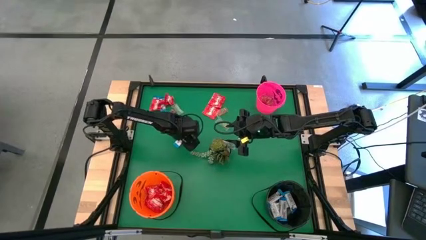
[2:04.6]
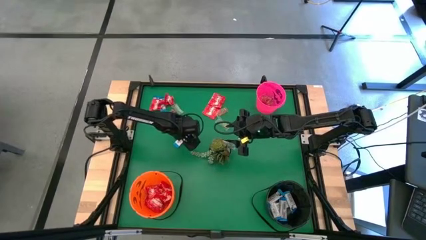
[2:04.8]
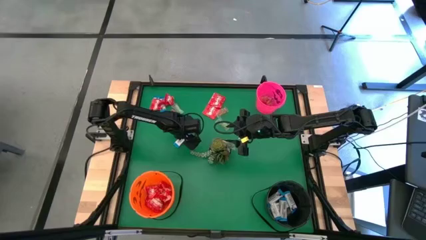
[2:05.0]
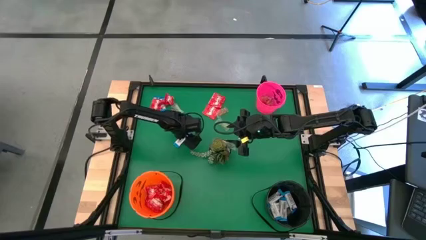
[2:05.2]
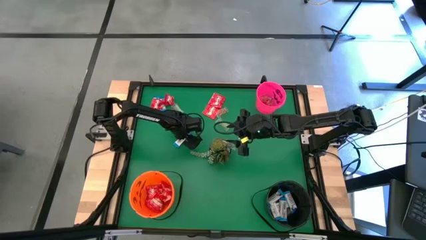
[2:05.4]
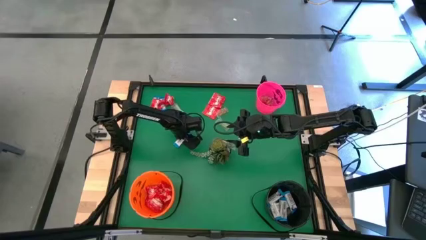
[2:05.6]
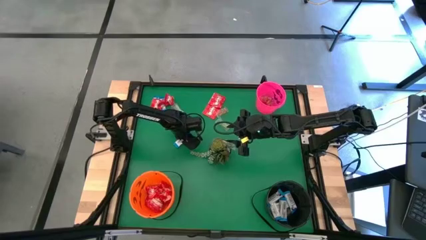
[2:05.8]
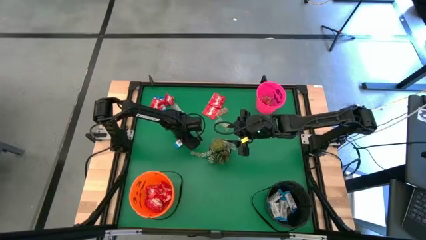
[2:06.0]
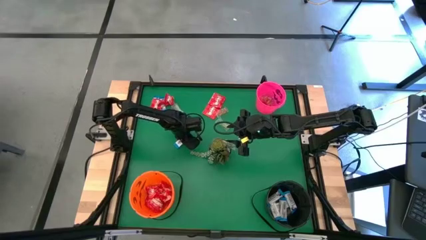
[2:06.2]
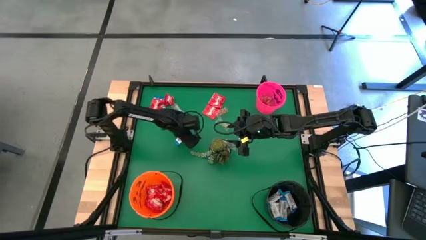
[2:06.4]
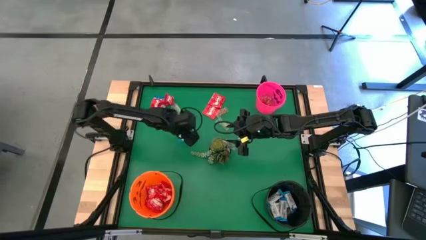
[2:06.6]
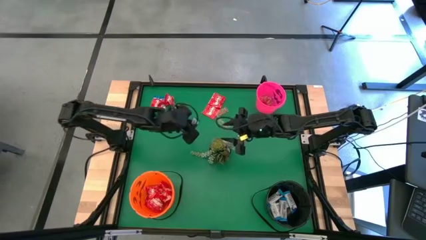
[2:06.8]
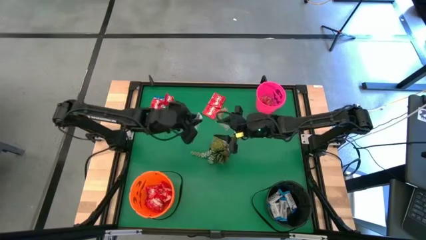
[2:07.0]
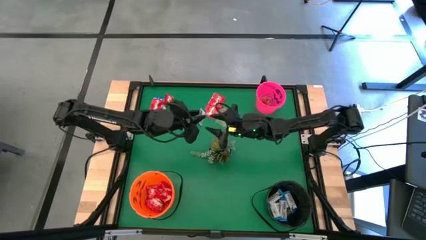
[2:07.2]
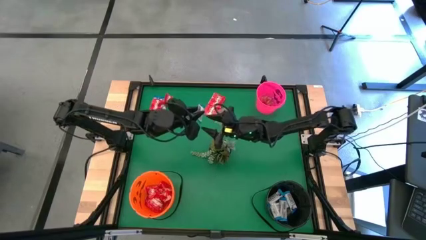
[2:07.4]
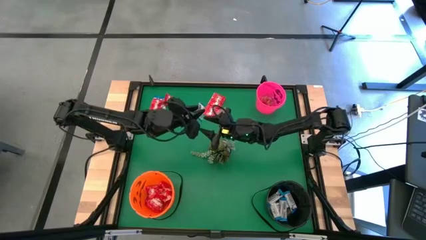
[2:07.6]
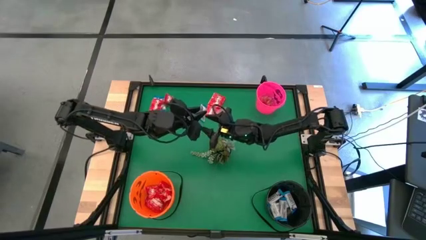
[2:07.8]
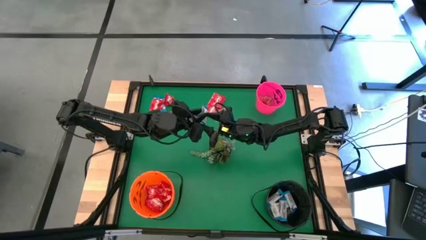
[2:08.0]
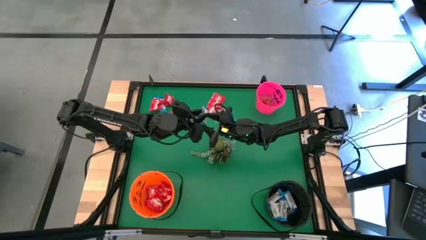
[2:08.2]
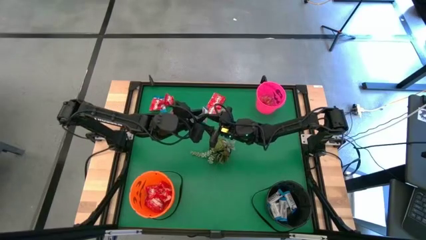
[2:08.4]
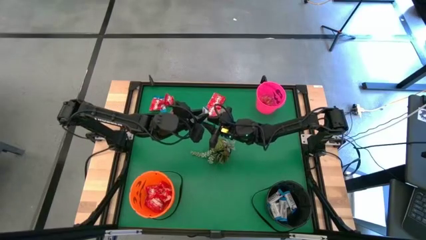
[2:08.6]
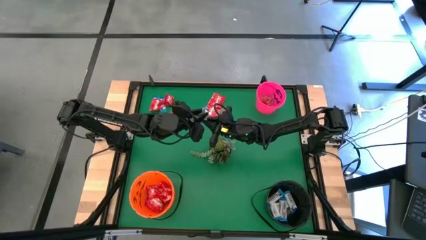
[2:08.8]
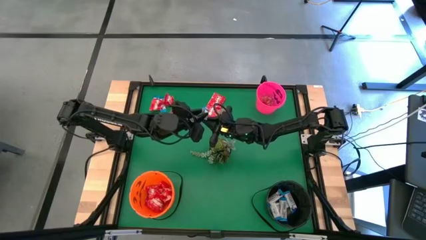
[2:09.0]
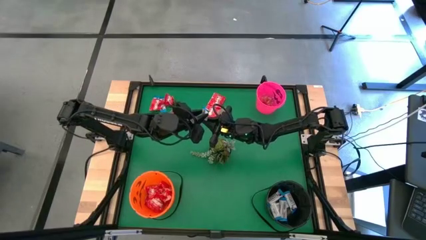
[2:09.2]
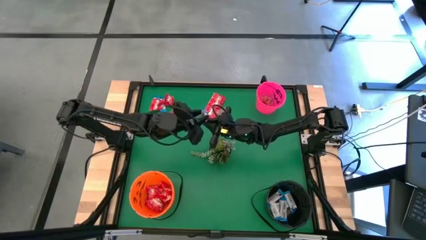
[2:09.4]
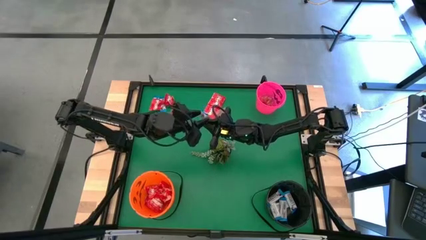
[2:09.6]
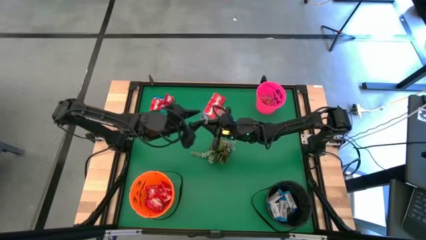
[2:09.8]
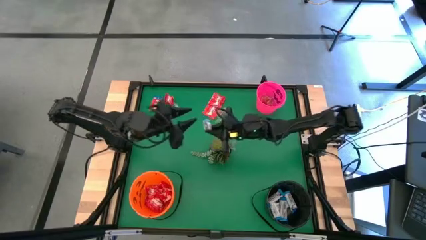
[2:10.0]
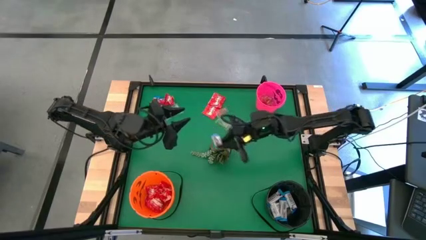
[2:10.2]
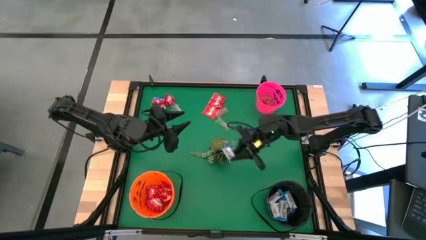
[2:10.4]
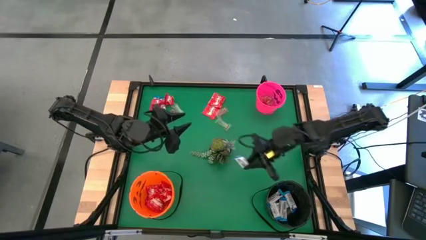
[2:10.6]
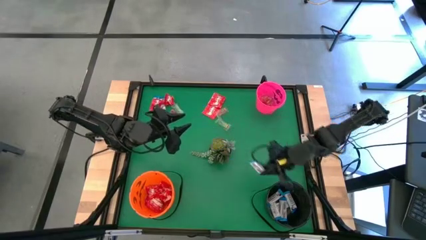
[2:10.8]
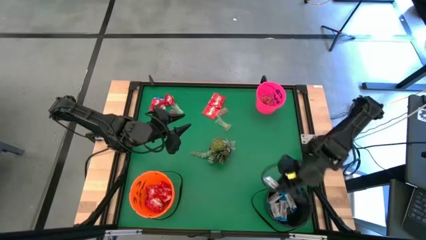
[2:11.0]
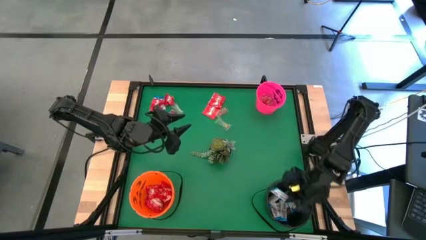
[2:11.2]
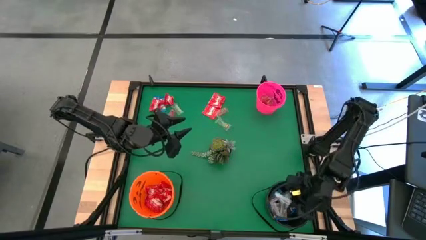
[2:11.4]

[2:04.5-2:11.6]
Task: Sort candy
Put the white chocolate into the black bucket

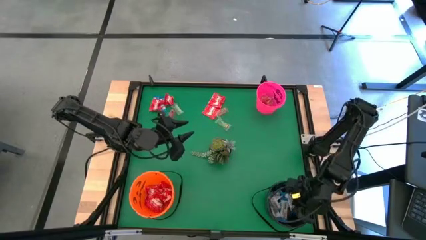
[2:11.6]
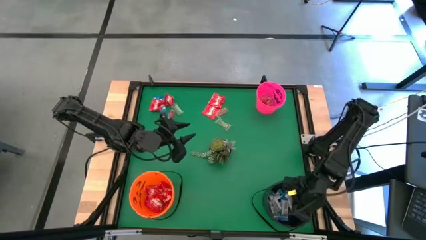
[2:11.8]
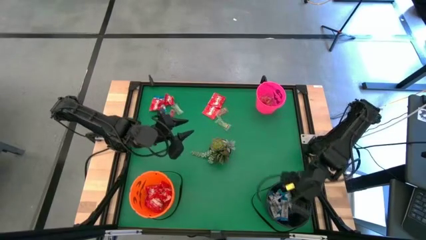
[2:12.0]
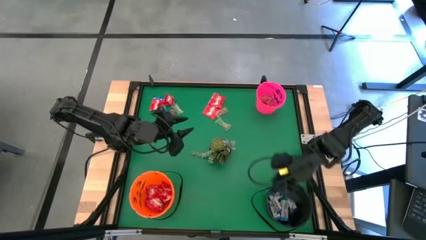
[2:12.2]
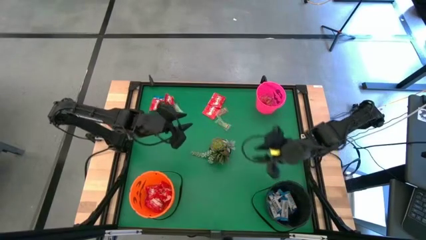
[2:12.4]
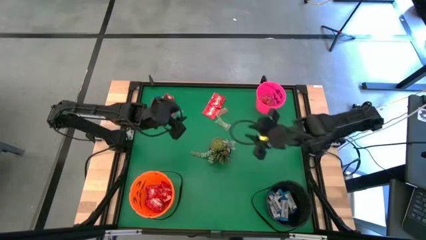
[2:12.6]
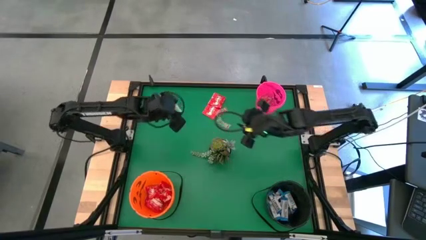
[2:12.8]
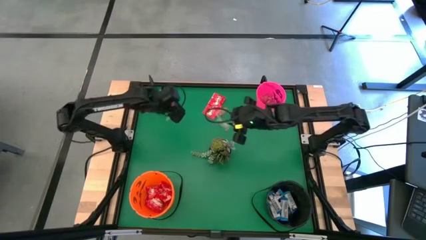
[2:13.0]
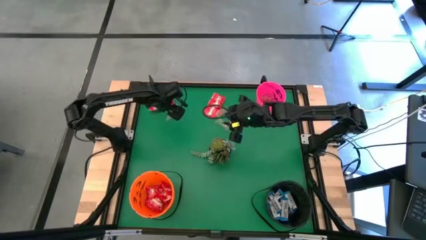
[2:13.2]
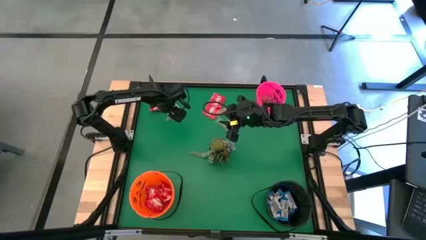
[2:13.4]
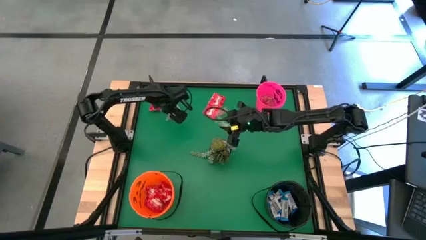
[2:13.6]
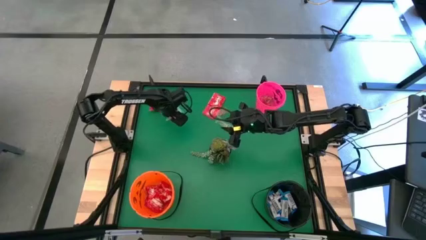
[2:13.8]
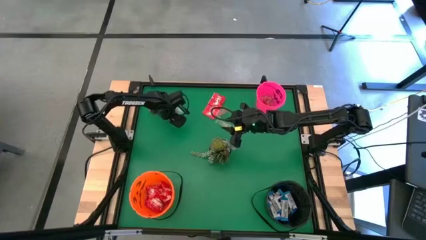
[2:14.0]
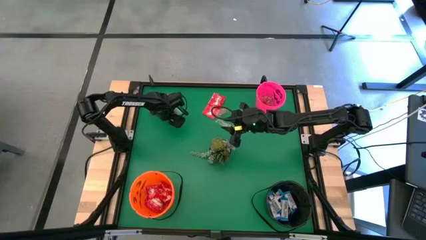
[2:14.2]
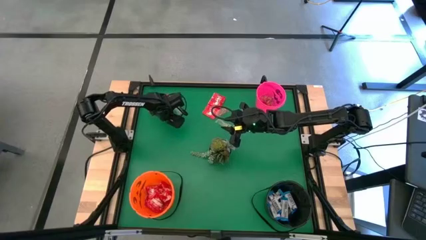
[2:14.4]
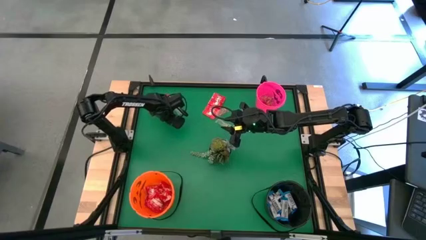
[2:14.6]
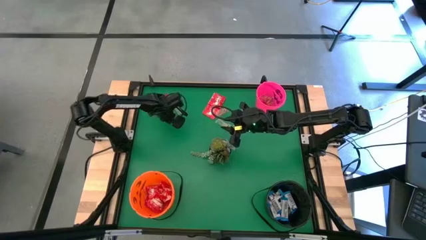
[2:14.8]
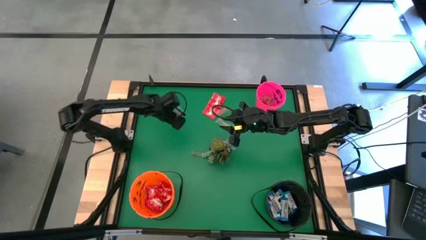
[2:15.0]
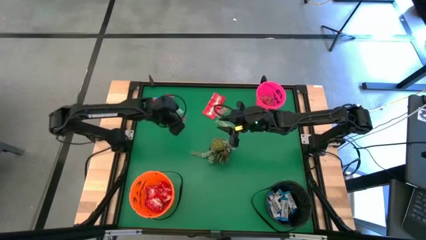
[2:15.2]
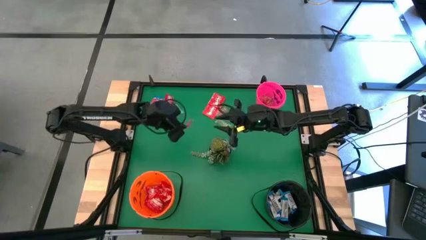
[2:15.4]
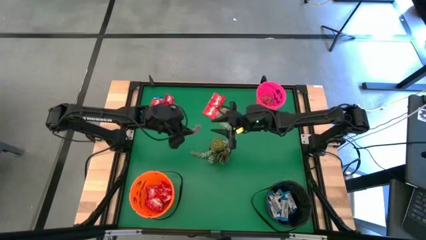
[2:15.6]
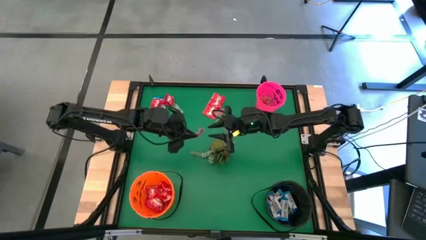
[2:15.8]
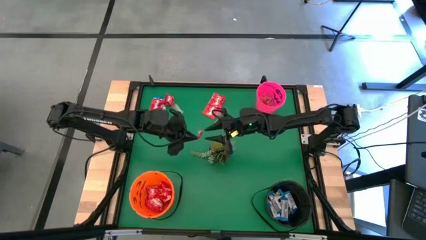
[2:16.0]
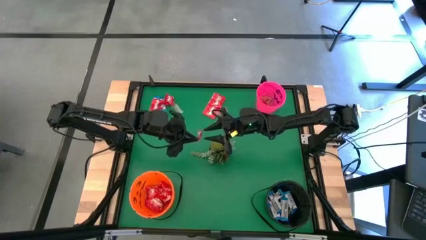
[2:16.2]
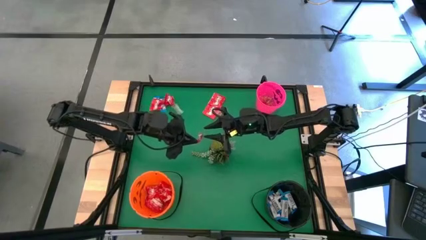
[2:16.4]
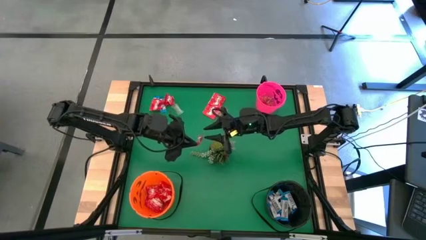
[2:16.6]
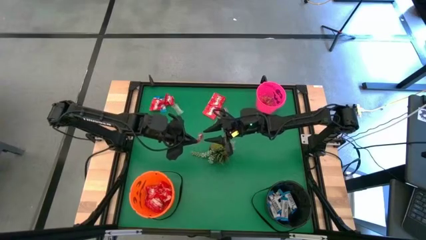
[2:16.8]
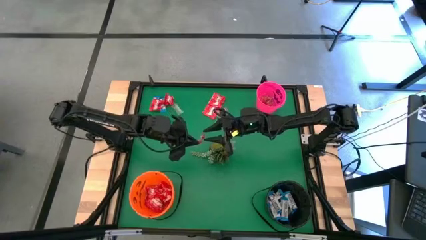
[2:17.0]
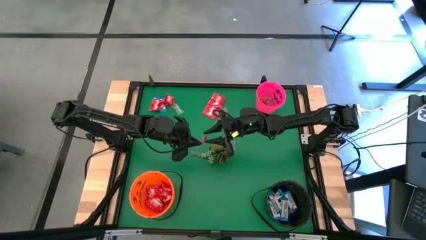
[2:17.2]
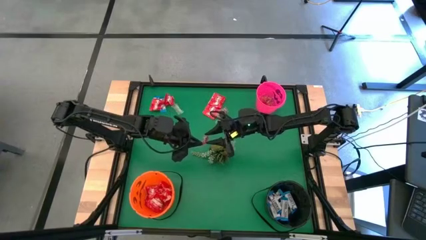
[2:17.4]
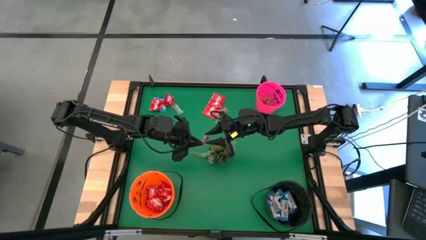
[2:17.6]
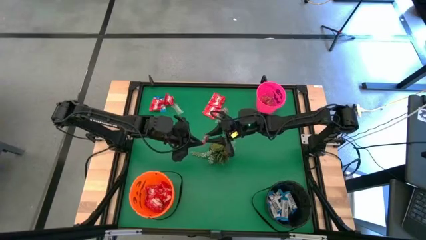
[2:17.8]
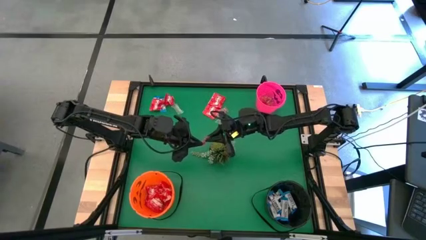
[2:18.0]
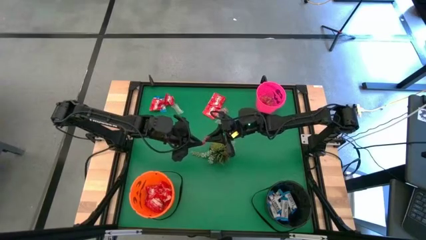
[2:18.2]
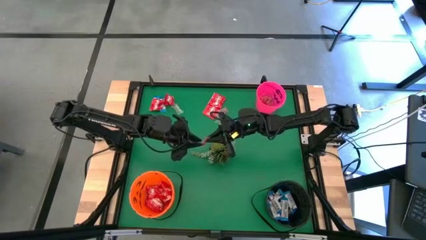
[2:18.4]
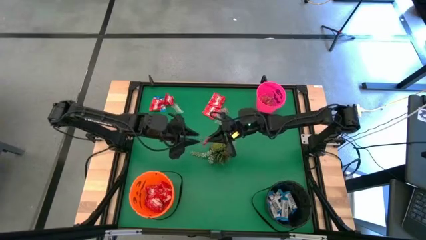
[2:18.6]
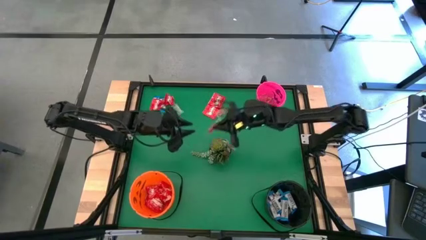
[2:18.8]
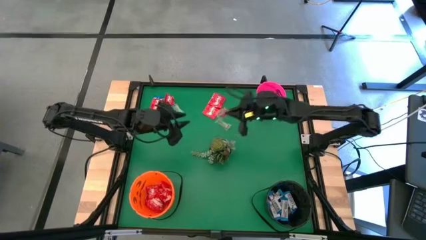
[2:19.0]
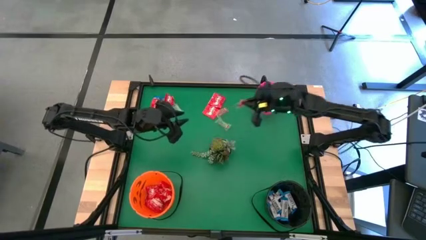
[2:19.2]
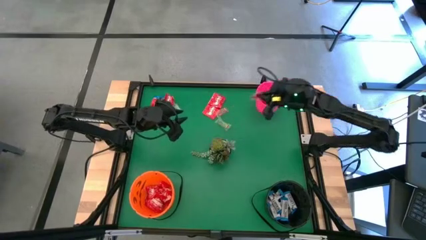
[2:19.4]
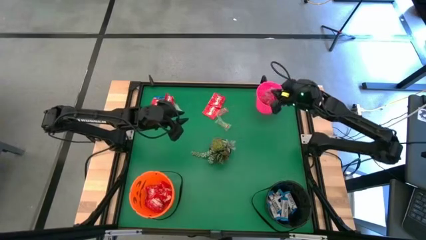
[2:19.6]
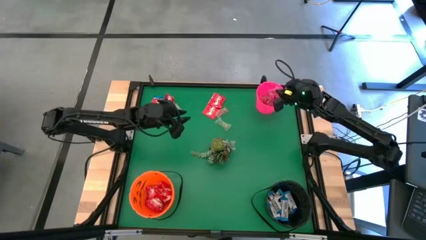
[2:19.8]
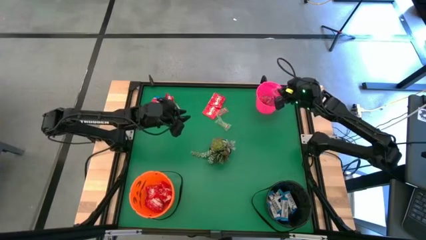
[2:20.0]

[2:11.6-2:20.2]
Put the orange gummy into the pink bucket

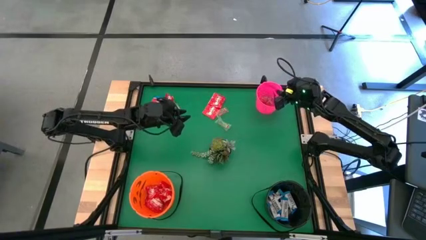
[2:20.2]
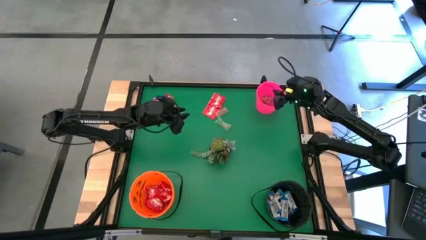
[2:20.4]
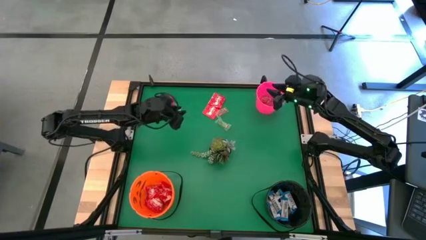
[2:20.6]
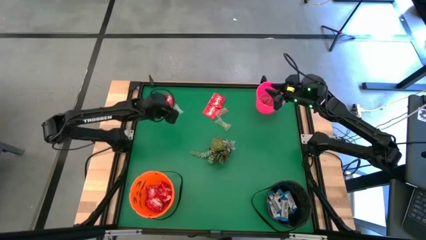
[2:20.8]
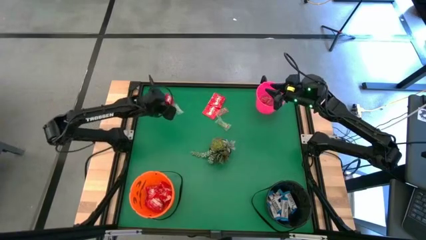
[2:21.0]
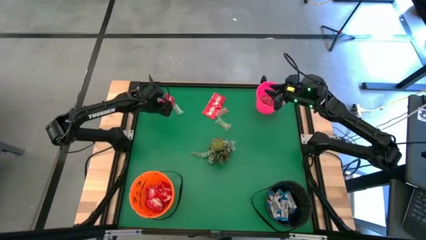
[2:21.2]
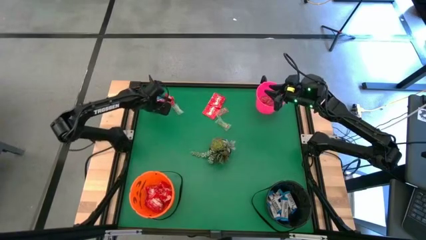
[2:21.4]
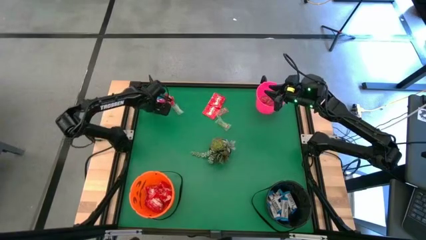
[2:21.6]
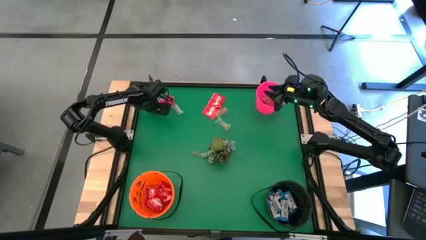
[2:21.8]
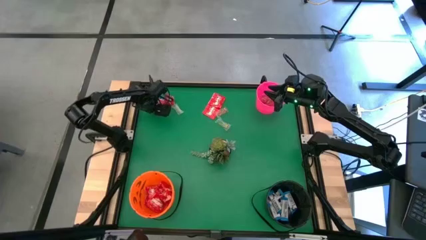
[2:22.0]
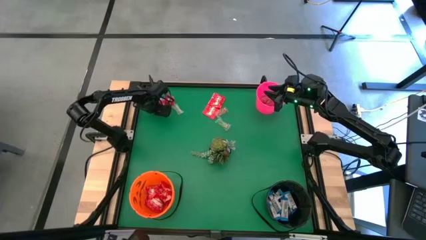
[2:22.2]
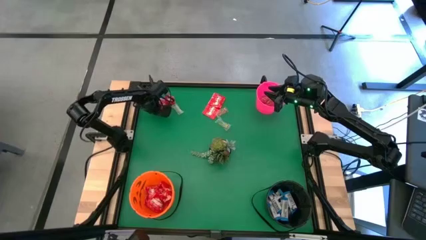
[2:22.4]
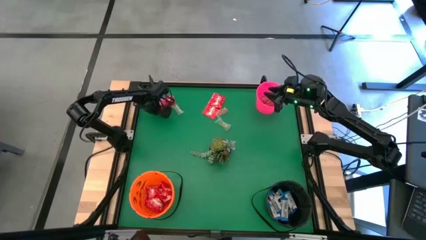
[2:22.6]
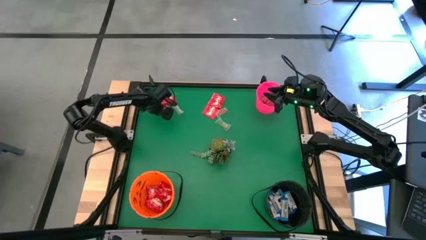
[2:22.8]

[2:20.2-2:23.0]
Put the red candy into the orange bucket
